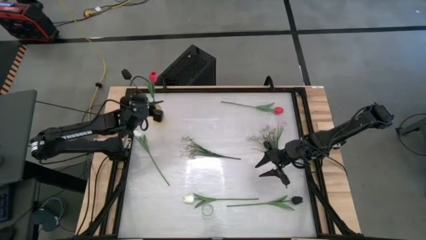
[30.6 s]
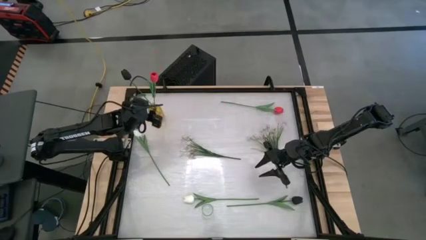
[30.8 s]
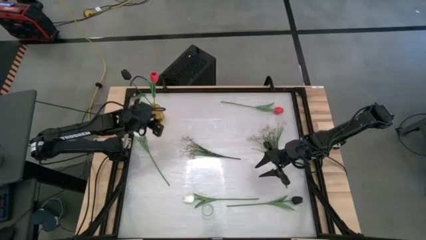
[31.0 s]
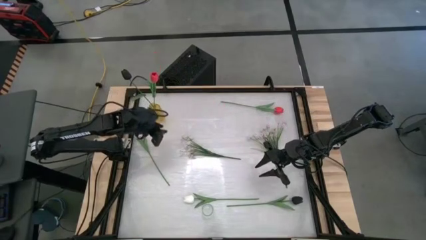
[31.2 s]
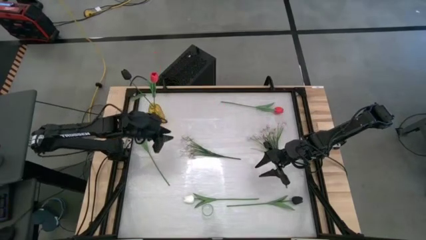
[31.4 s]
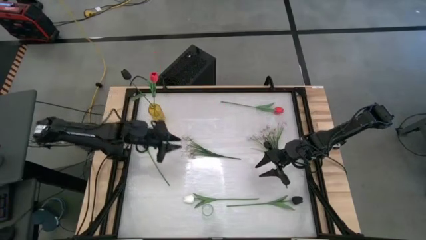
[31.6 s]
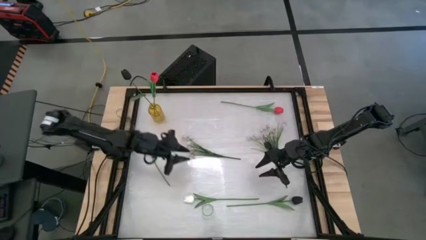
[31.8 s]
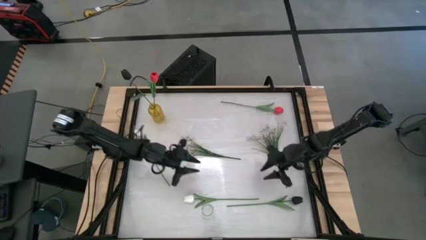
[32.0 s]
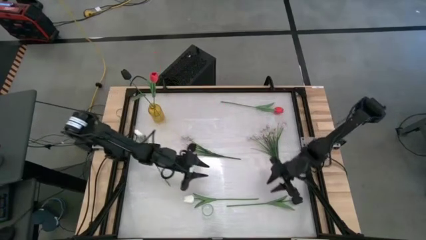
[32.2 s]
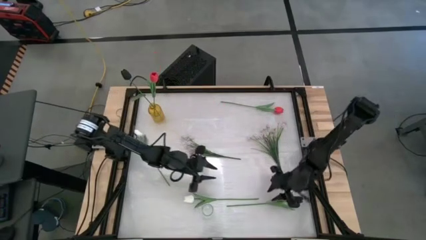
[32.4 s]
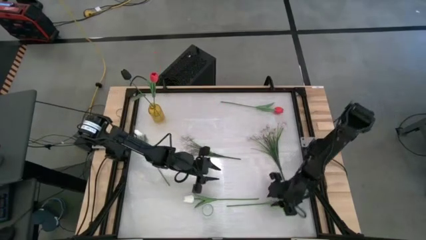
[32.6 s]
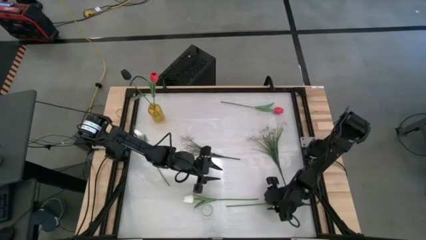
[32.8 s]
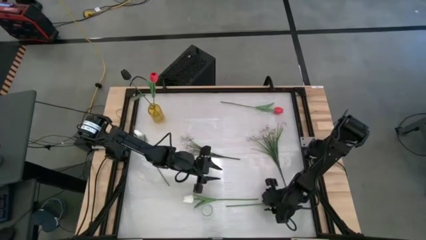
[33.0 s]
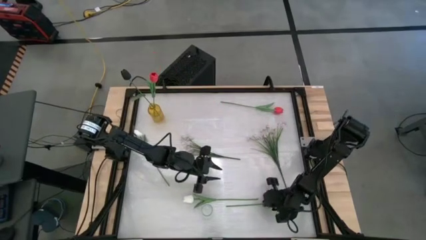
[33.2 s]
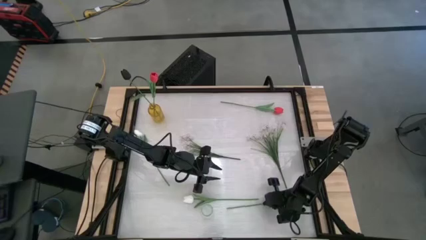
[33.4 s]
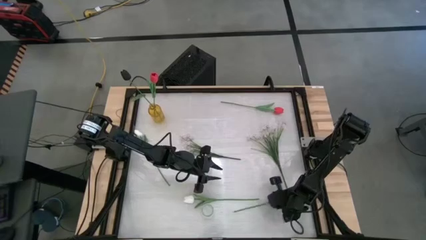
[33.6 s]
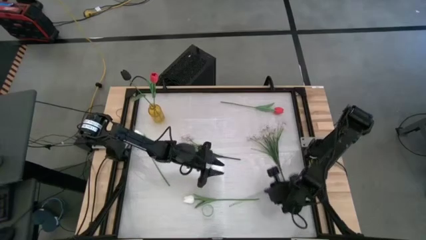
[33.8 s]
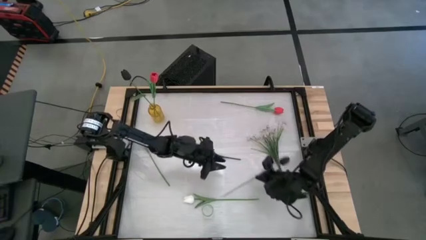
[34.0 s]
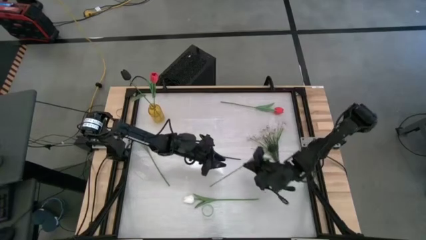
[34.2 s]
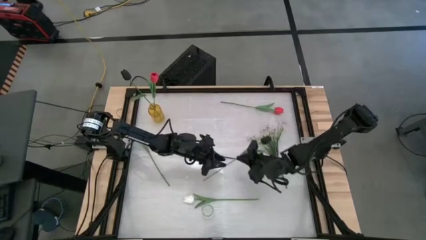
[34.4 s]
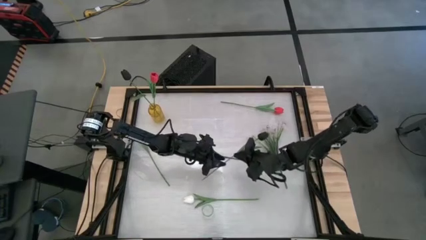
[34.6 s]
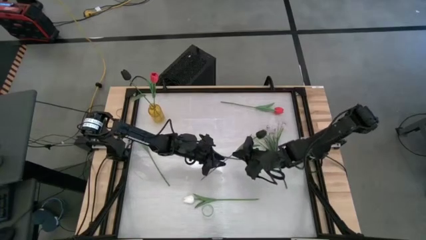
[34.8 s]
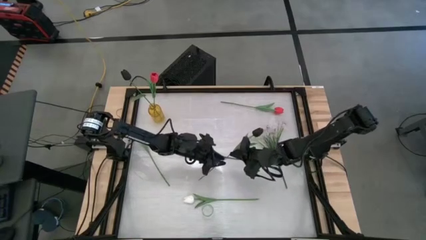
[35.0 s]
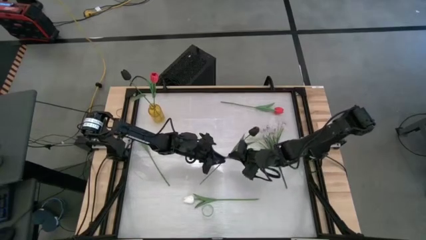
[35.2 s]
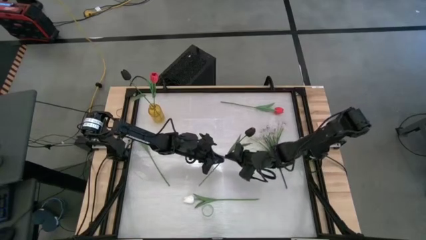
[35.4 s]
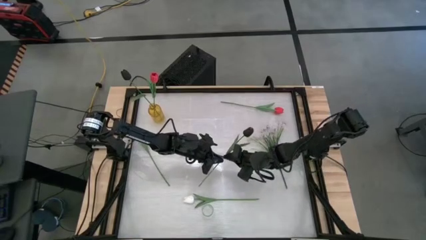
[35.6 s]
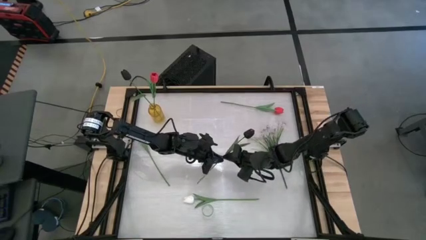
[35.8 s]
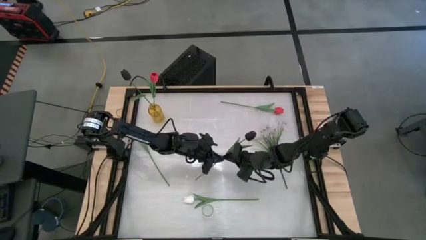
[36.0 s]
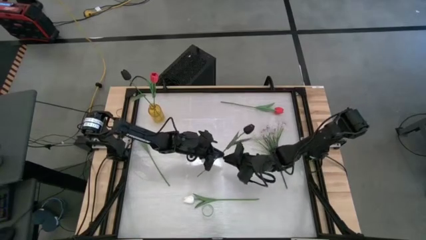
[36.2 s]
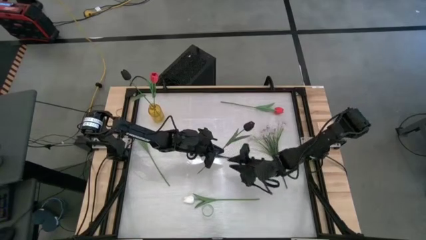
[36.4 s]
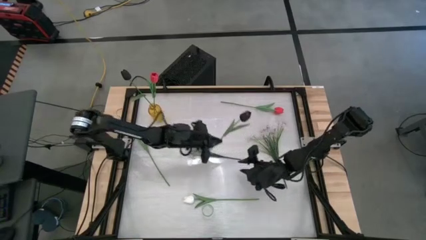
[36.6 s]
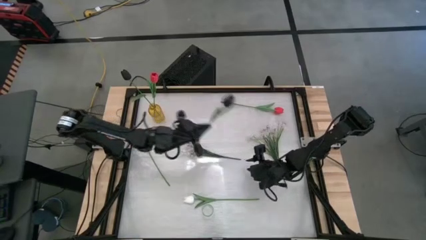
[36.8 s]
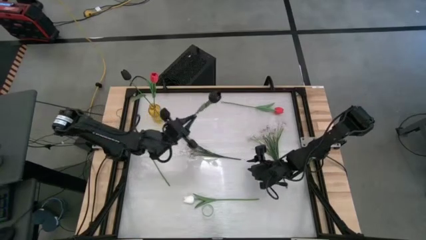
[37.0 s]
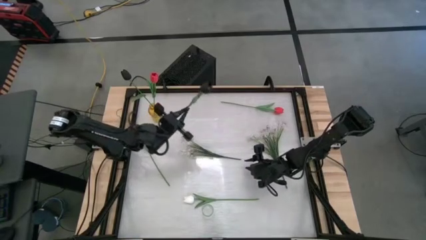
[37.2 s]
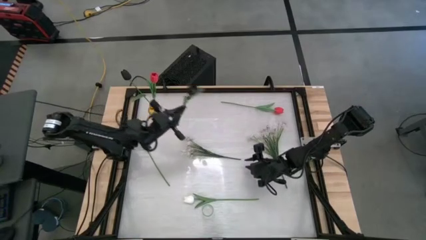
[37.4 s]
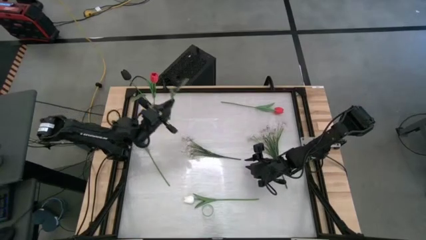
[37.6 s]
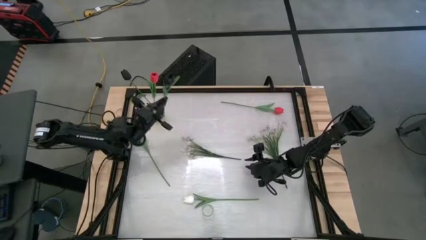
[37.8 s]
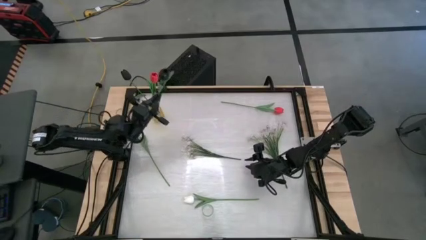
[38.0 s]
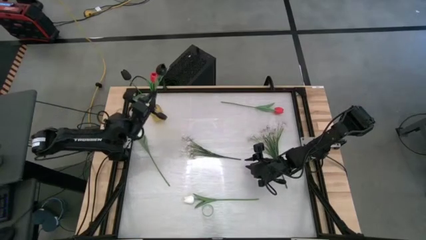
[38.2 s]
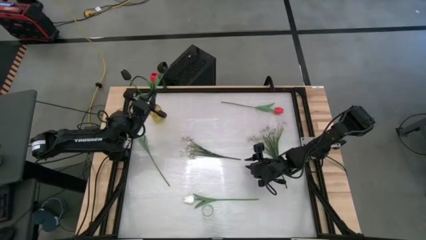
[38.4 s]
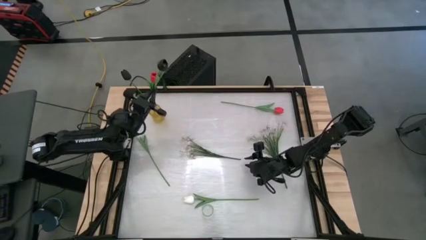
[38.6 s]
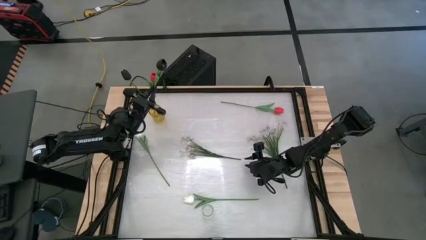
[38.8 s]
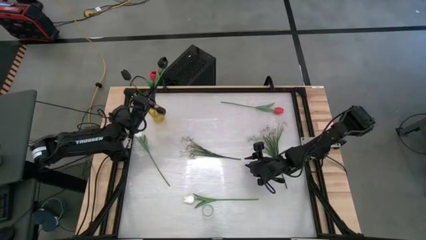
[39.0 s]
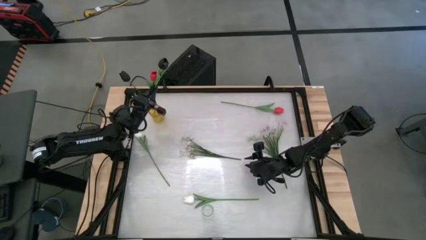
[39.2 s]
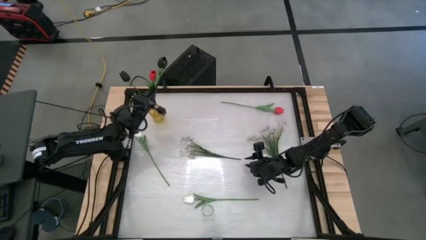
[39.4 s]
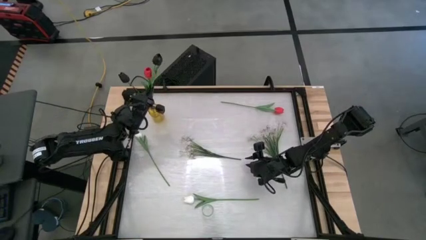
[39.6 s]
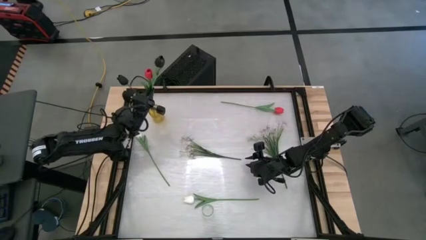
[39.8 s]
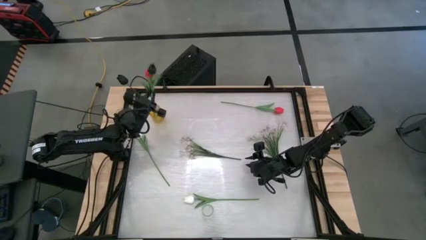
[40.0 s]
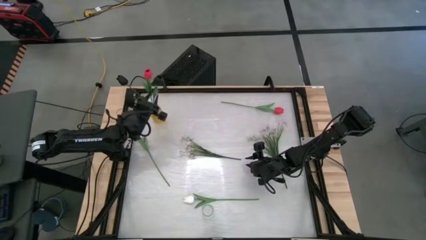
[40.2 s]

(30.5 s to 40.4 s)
Task: Sort flowers into vase by color
Put the black tulip into the yellow vase
